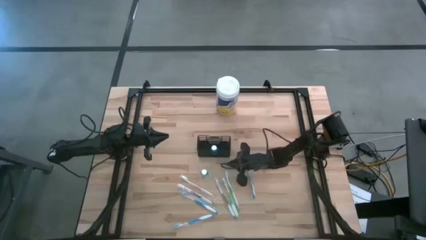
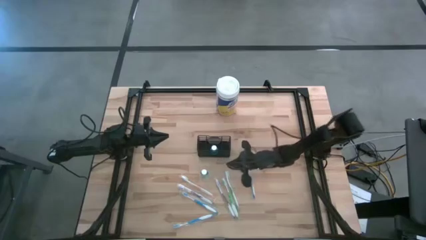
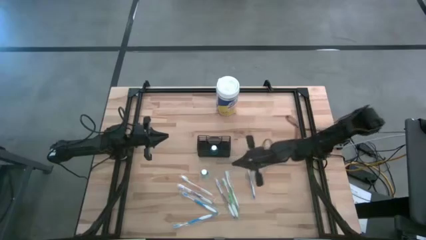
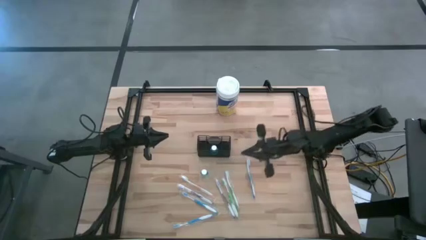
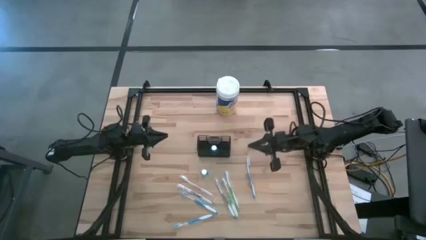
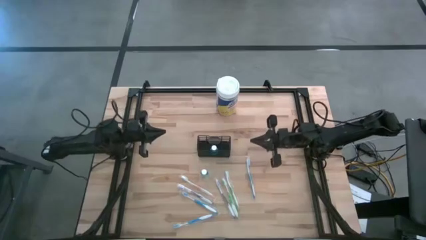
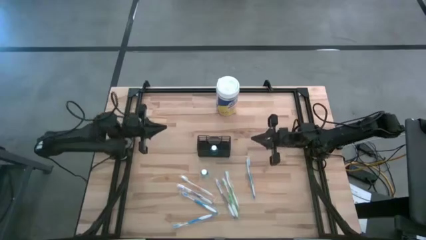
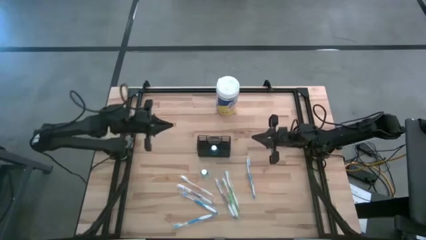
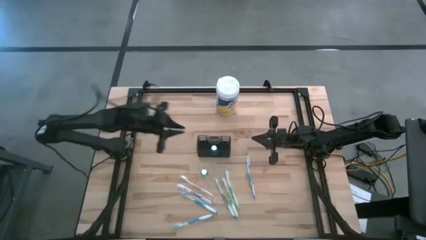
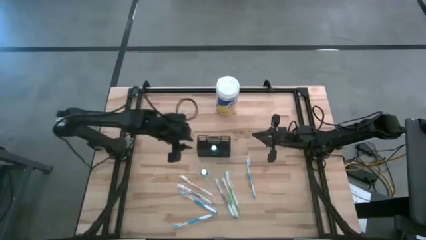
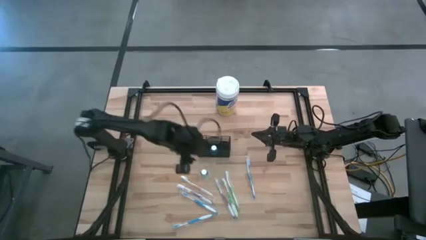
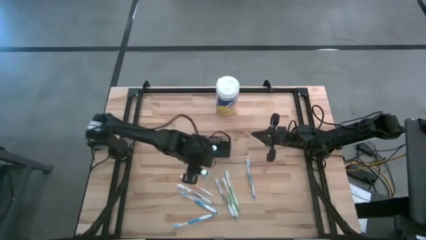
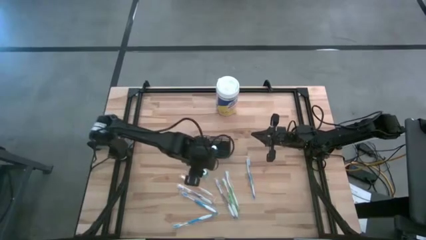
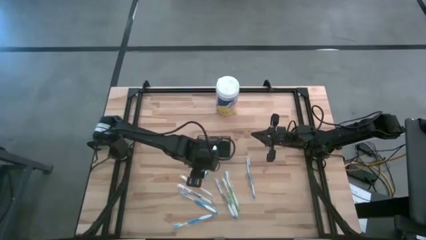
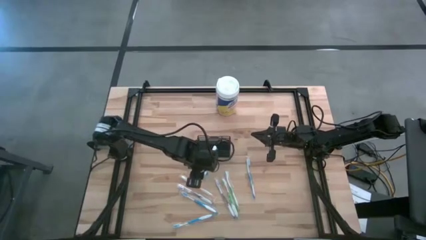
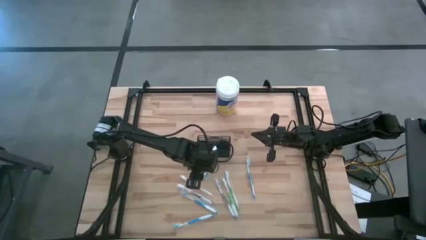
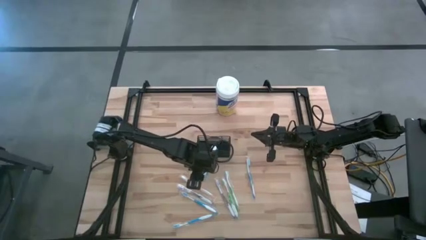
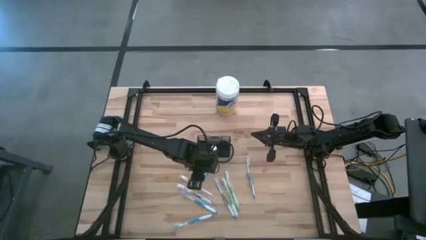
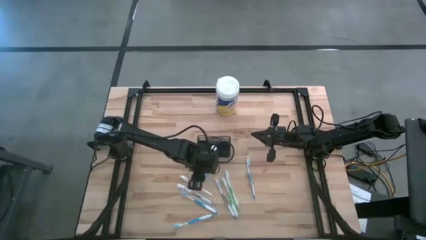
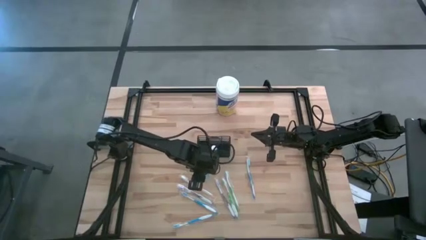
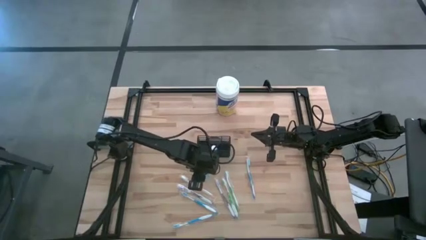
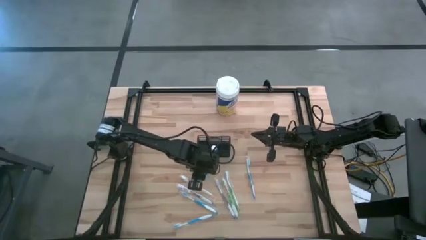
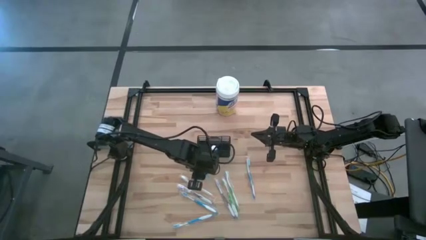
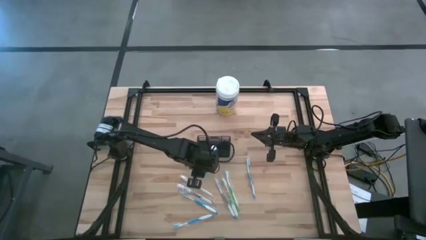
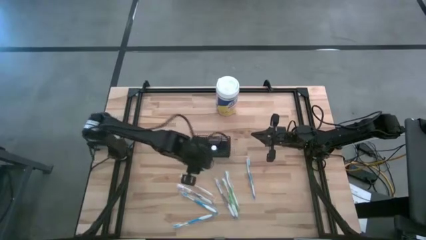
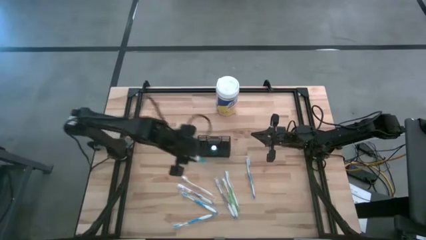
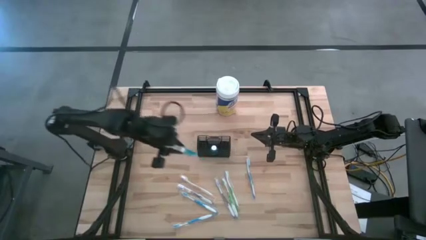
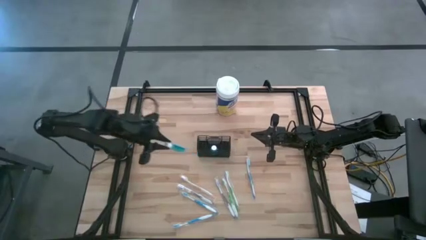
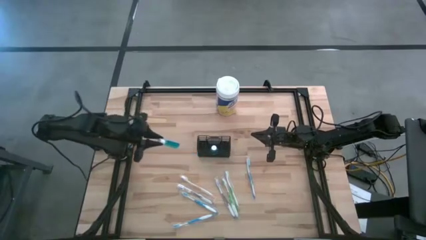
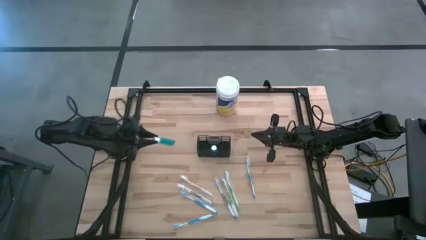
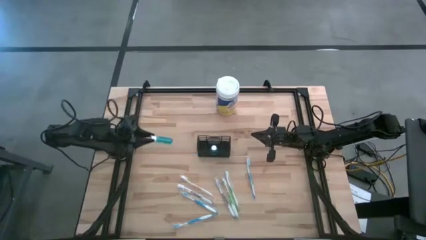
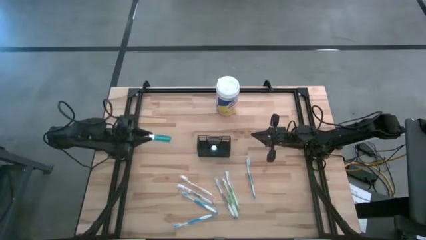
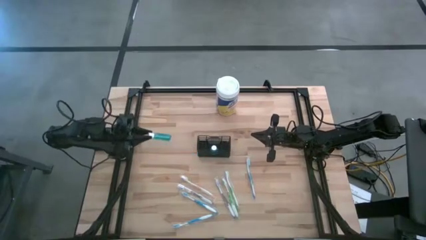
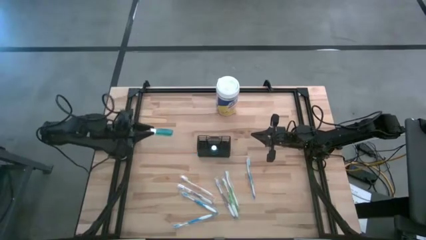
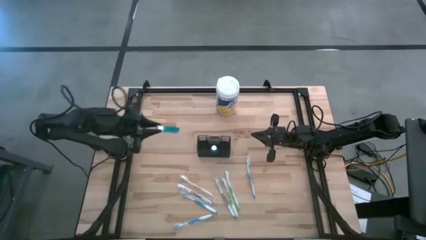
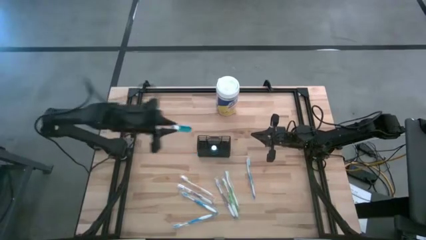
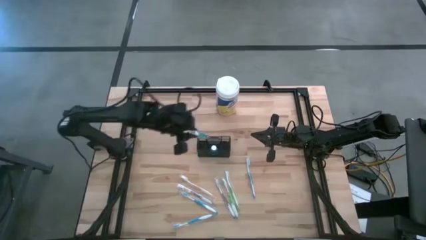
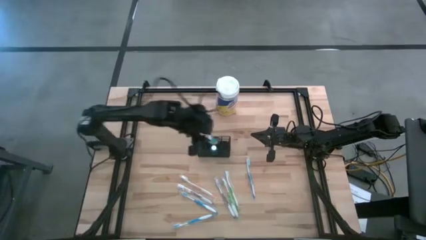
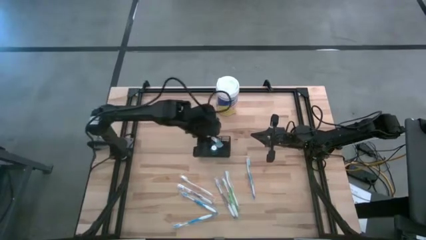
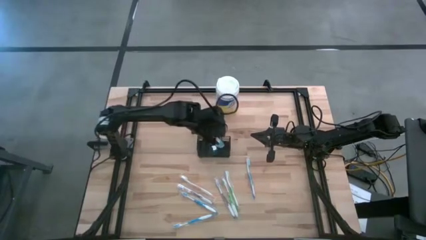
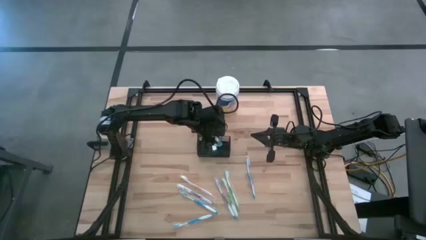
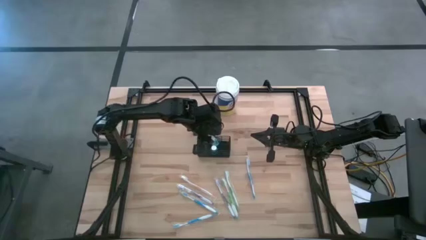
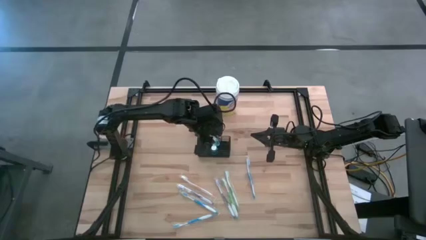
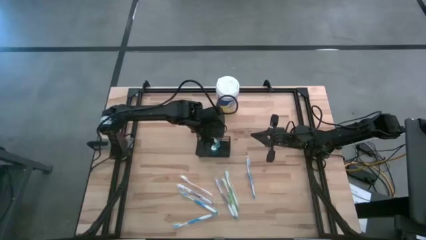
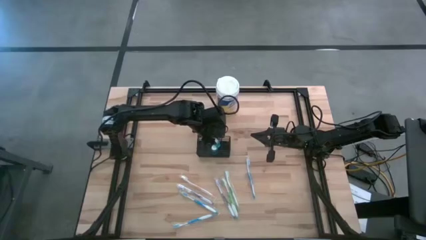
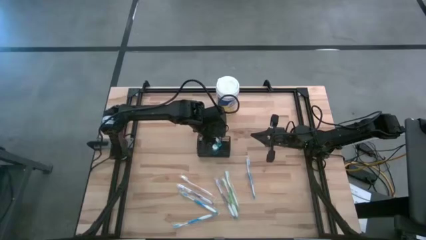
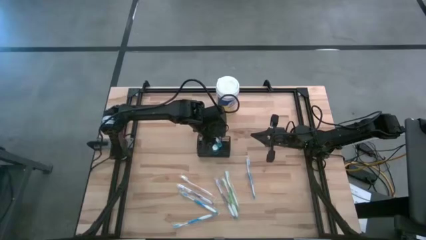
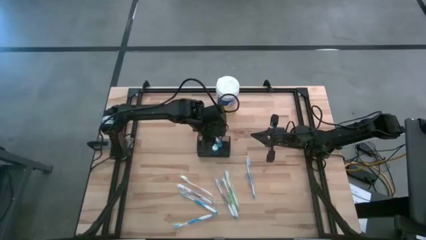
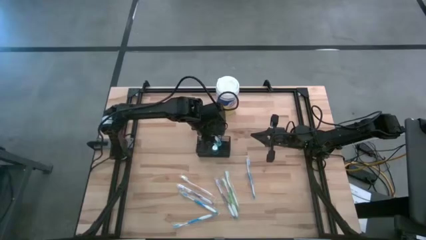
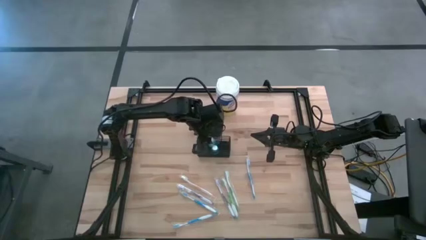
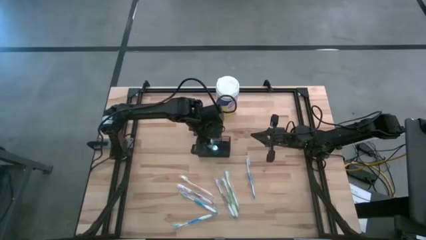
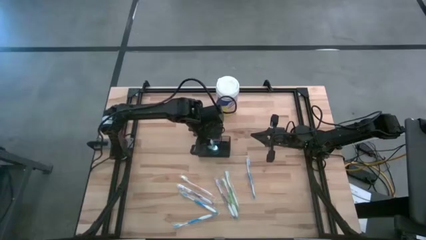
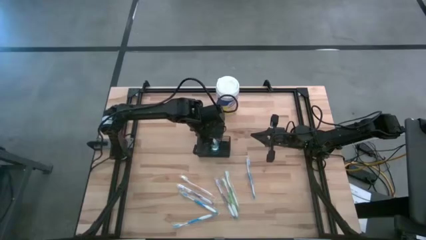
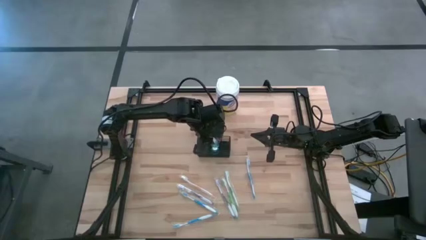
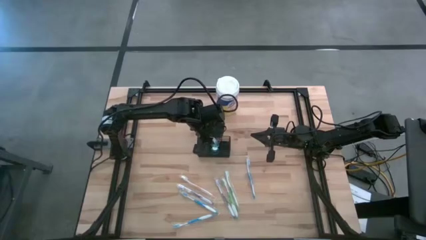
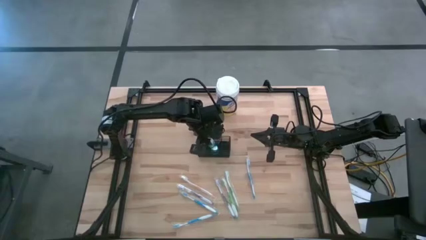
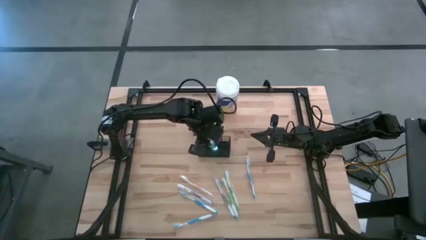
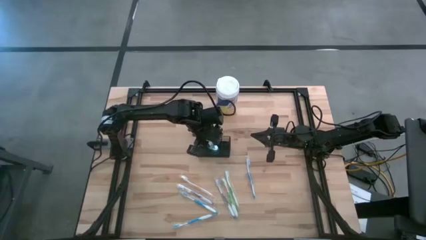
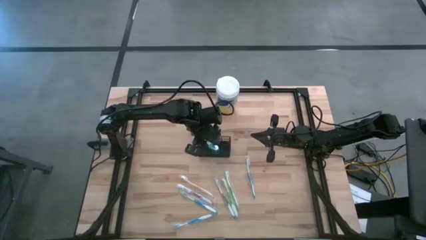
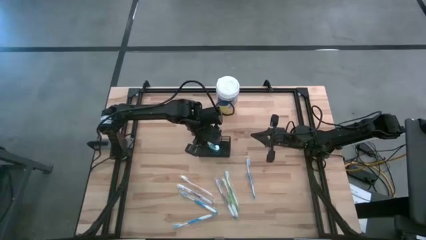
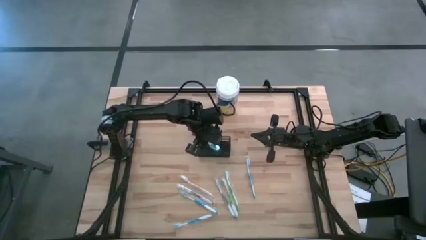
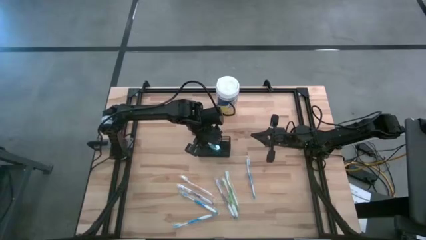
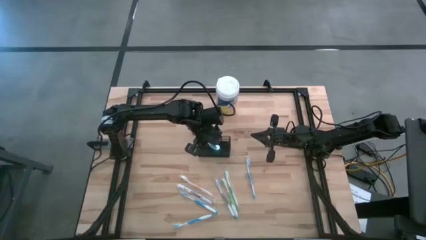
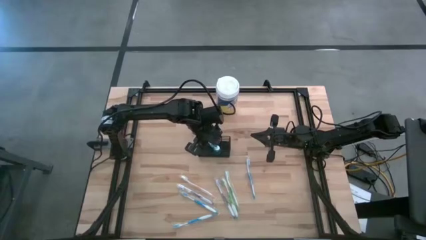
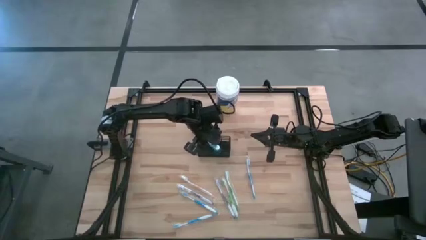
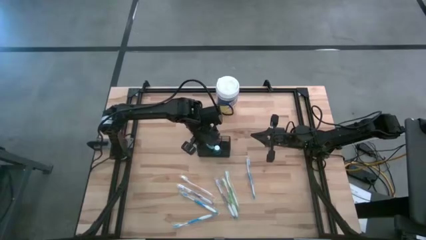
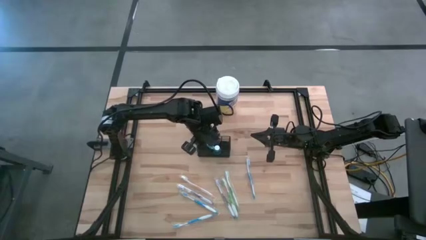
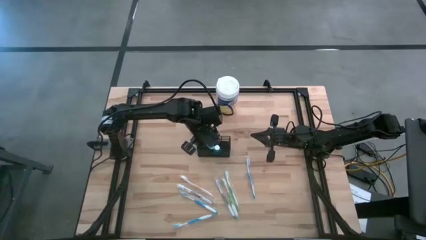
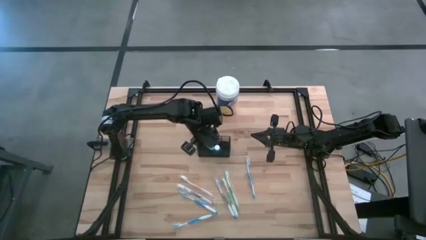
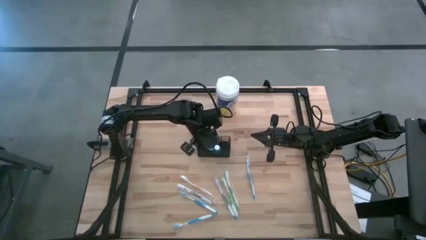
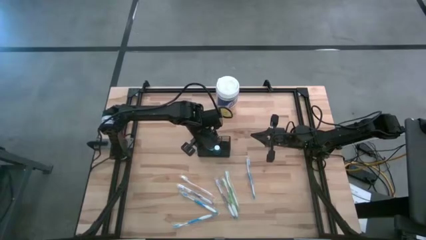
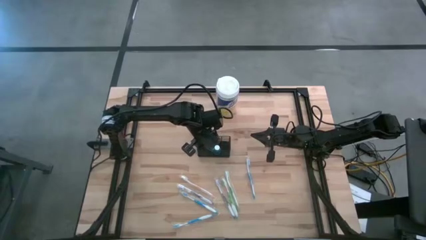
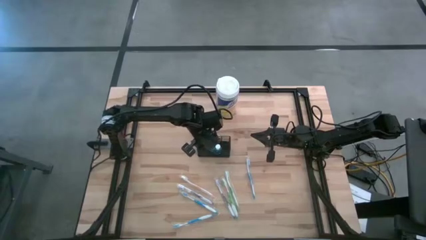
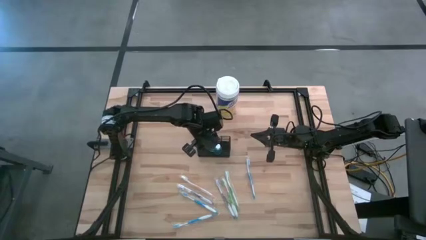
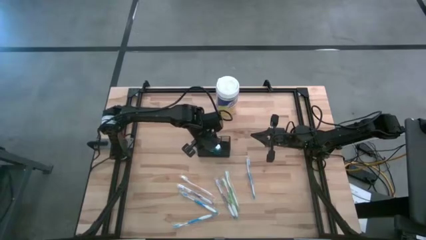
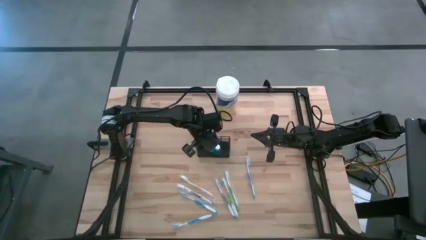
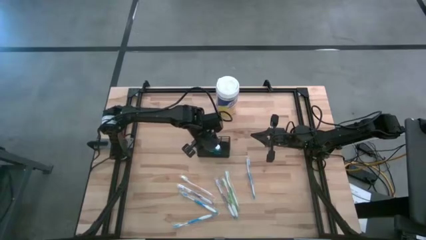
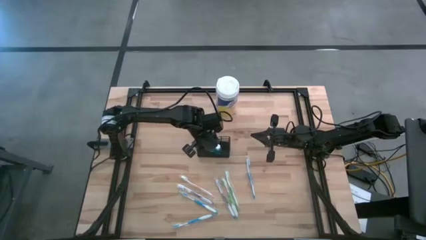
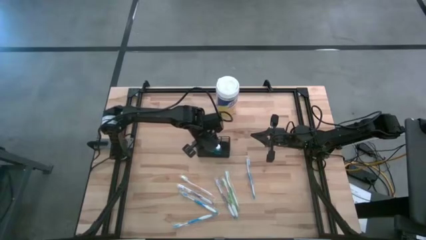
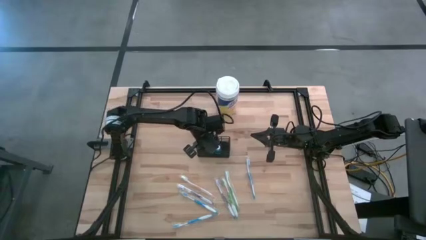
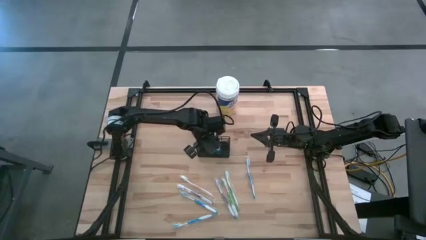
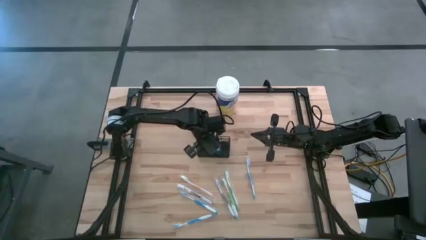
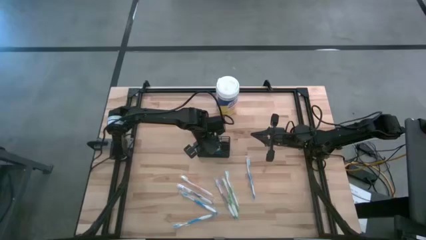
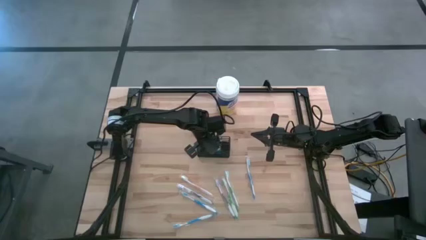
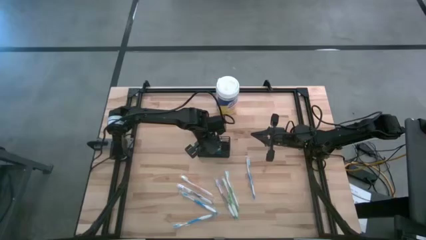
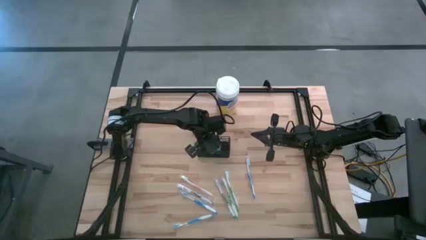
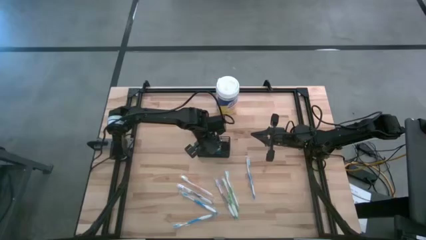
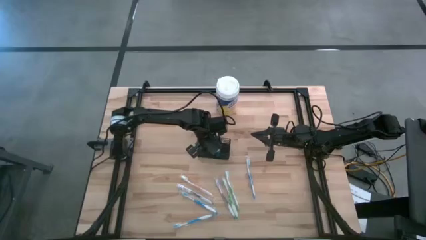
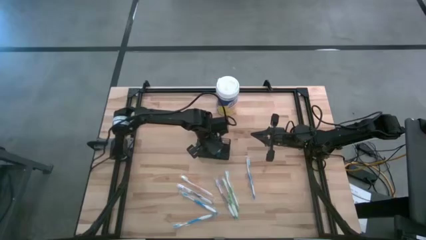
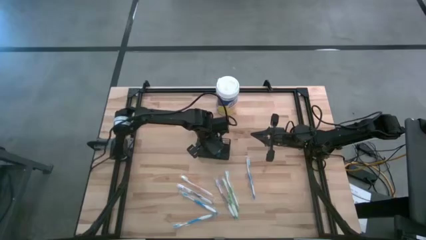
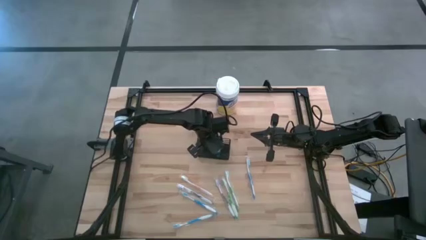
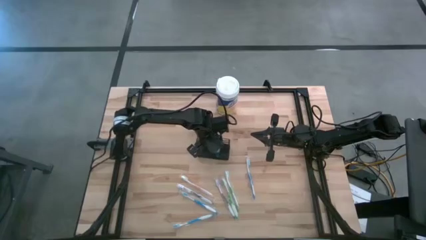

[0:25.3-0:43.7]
Task: Pick & Place toothbrushing station
Put the blue mouthwash into the black wire organizer
